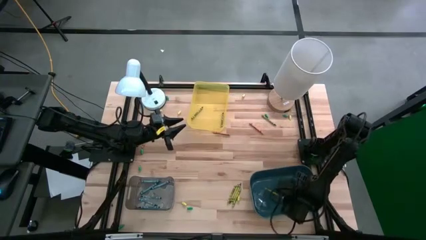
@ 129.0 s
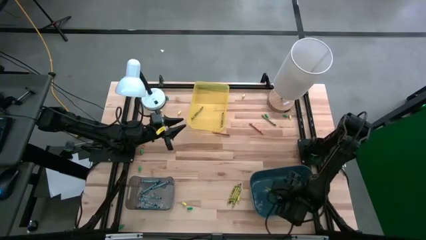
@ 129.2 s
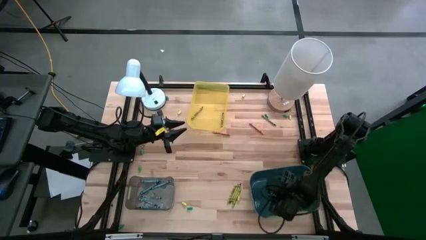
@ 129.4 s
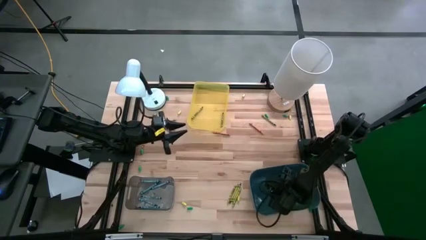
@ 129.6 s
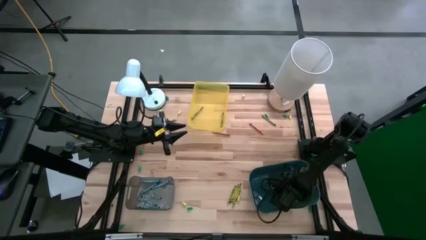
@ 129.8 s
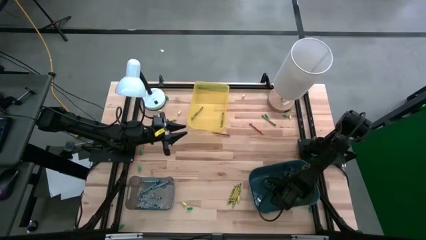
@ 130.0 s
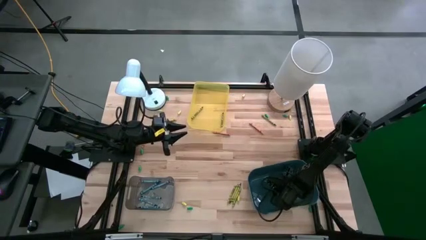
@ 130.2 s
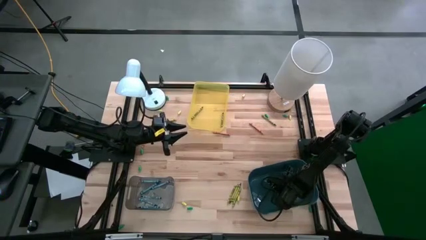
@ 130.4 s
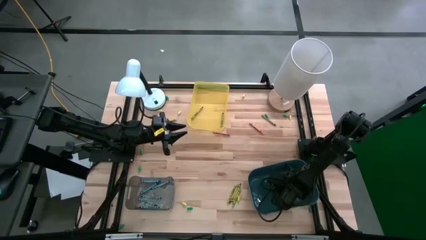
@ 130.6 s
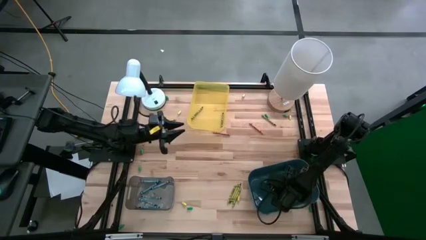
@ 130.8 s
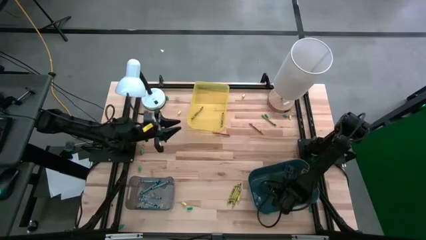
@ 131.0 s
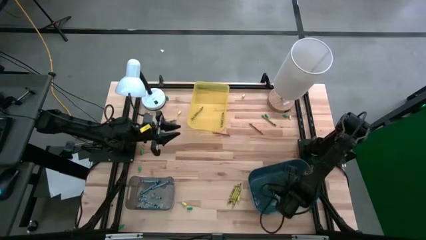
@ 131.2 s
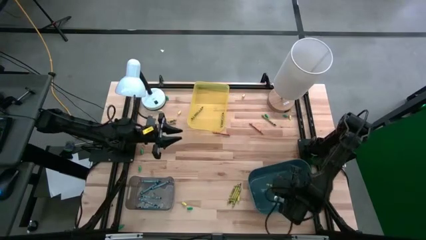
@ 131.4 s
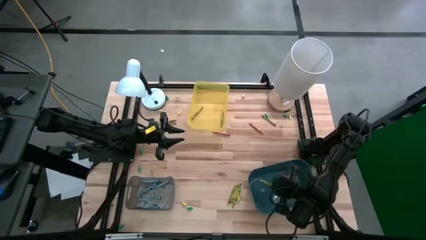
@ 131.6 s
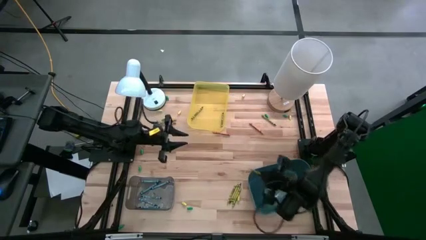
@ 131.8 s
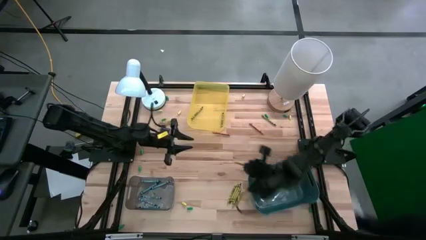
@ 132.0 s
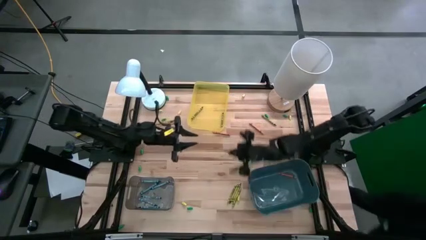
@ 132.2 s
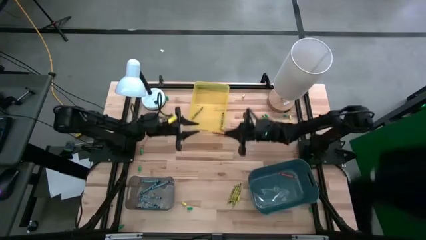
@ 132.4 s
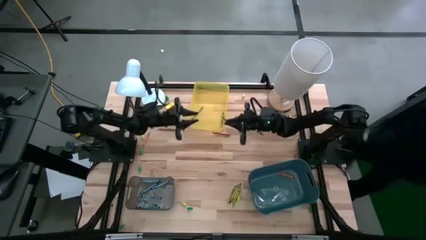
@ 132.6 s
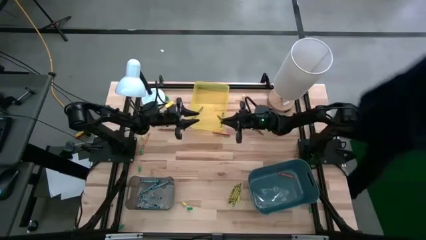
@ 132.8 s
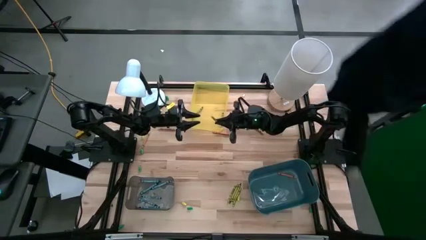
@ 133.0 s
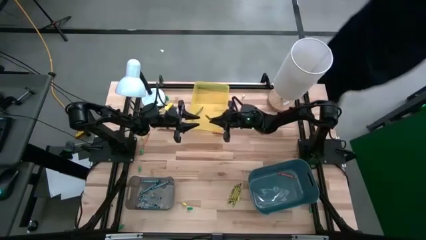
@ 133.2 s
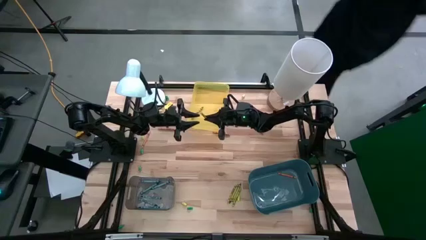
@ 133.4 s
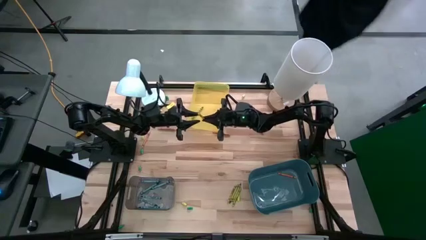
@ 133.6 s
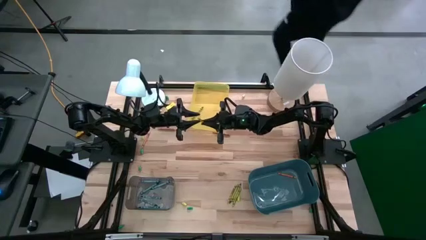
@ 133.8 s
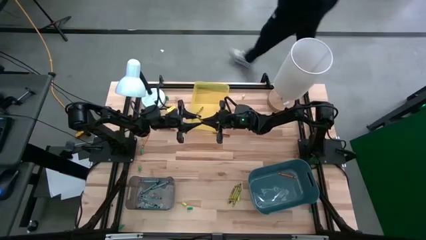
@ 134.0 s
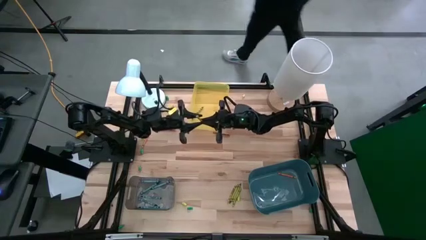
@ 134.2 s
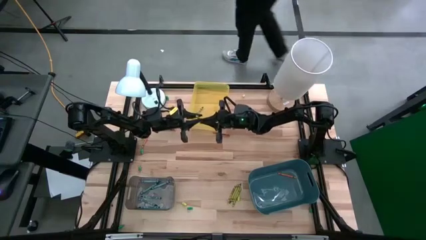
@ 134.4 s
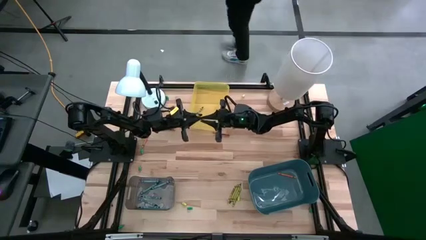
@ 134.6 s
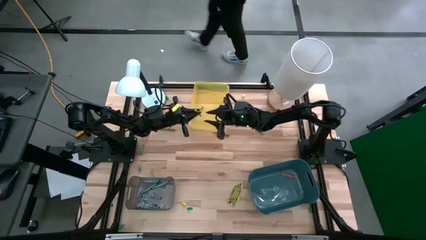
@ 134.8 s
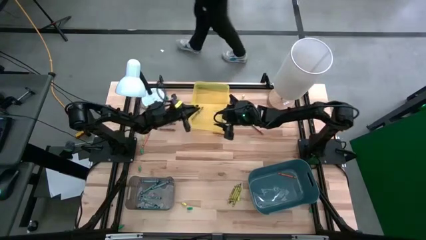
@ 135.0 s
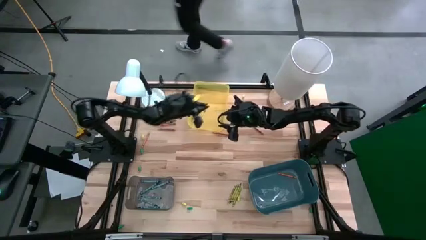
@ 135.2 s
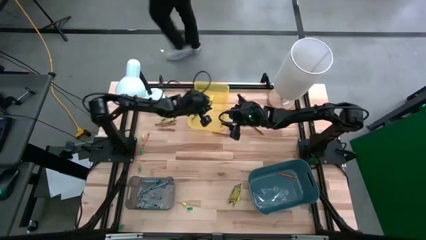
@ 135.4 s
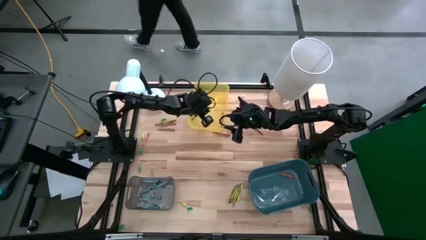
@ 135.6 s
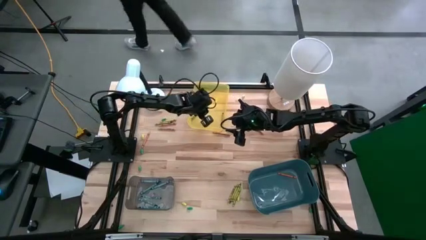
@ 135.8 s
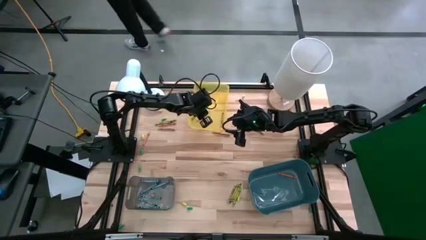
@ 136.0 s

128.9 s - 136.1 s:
Task: Sort crayons
Remove the yellow green crayon from the green bin to the yellow bin

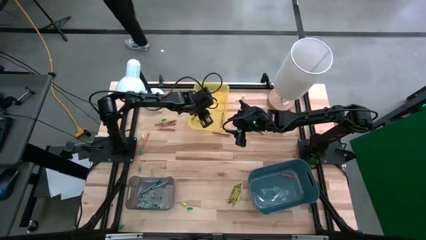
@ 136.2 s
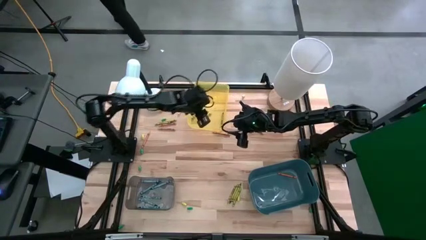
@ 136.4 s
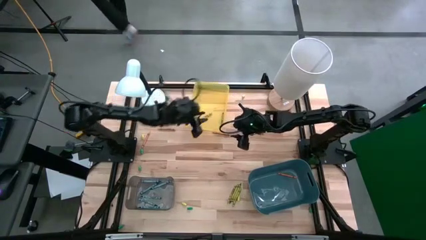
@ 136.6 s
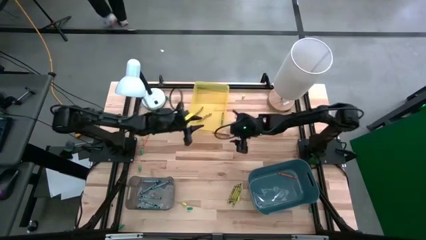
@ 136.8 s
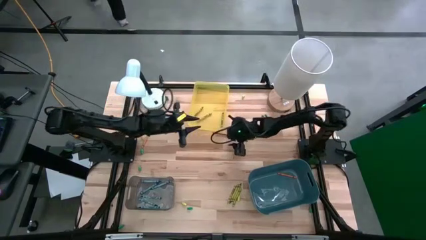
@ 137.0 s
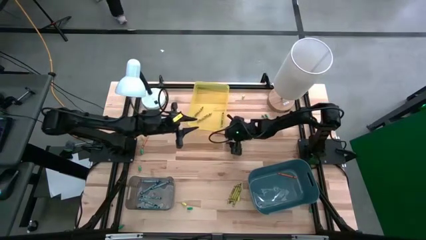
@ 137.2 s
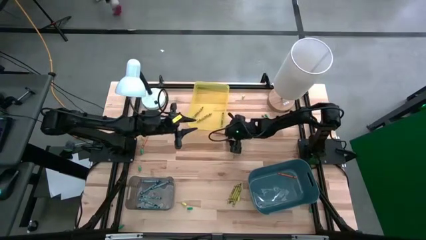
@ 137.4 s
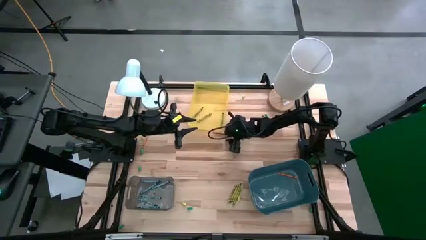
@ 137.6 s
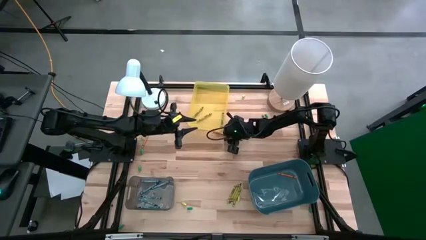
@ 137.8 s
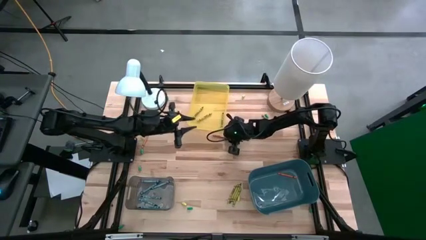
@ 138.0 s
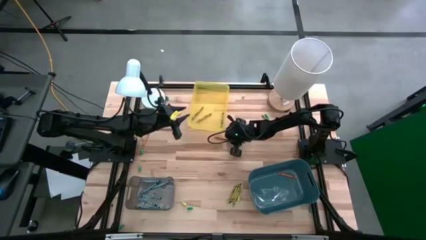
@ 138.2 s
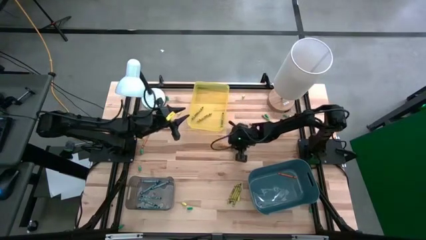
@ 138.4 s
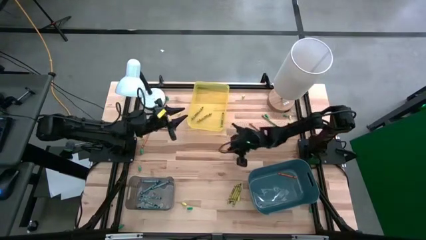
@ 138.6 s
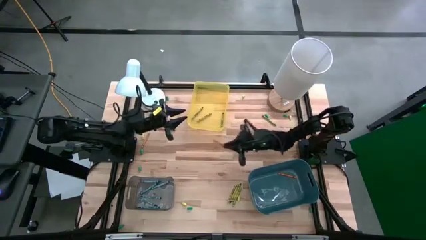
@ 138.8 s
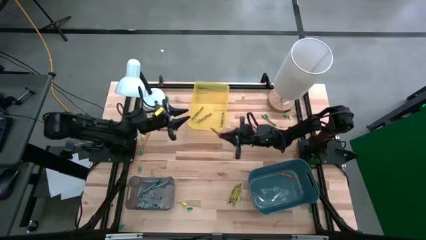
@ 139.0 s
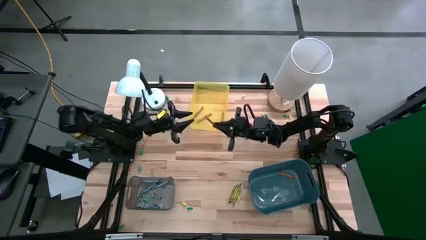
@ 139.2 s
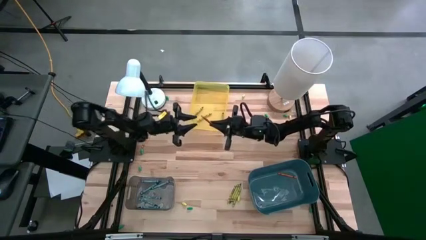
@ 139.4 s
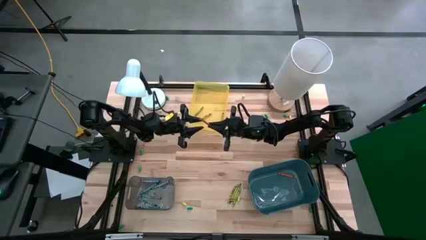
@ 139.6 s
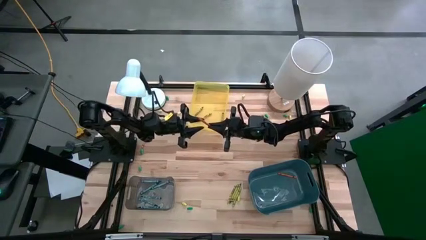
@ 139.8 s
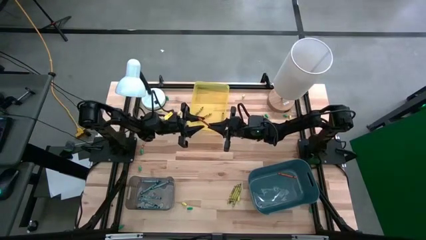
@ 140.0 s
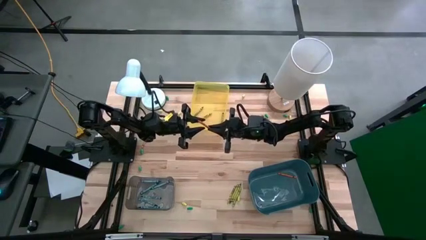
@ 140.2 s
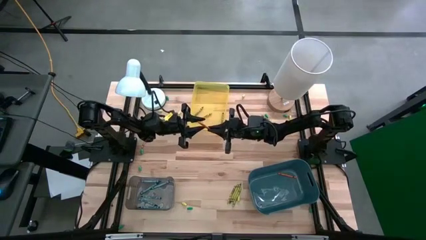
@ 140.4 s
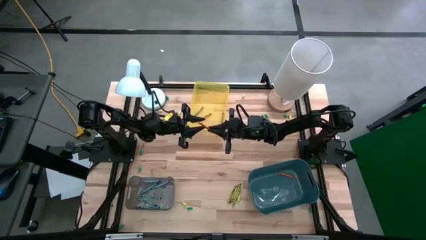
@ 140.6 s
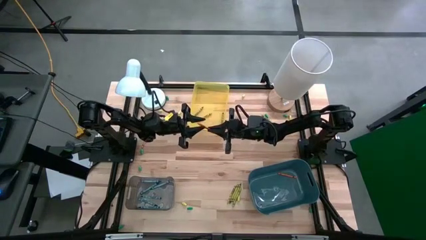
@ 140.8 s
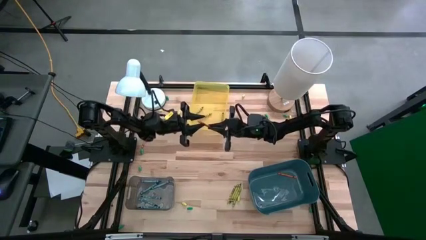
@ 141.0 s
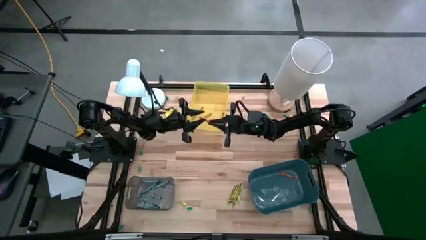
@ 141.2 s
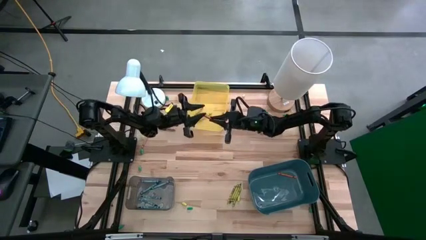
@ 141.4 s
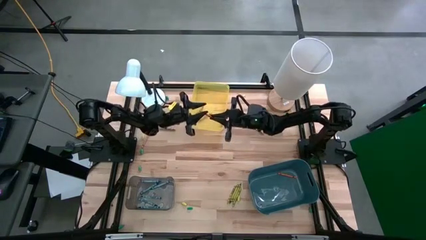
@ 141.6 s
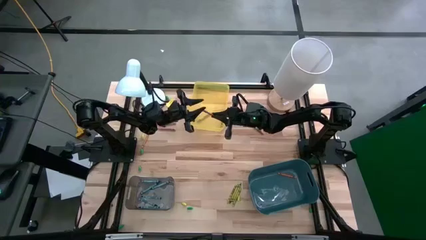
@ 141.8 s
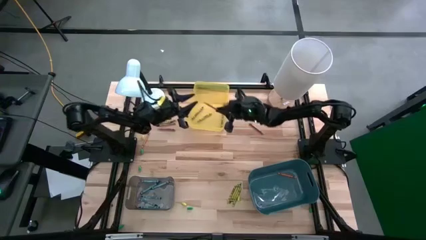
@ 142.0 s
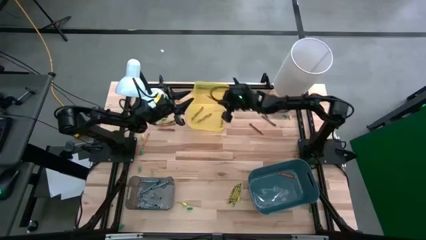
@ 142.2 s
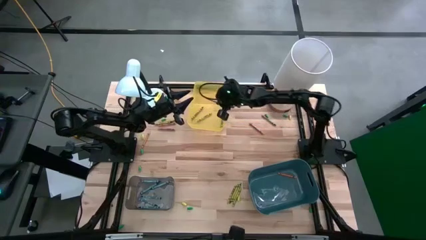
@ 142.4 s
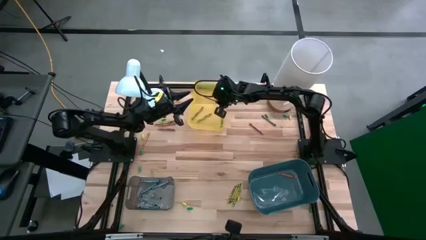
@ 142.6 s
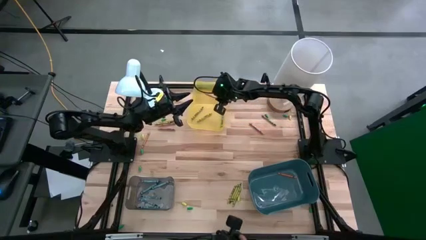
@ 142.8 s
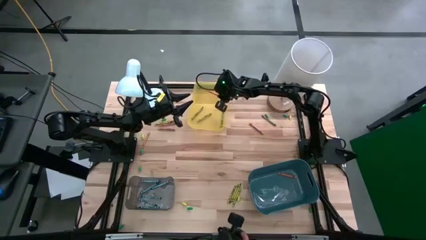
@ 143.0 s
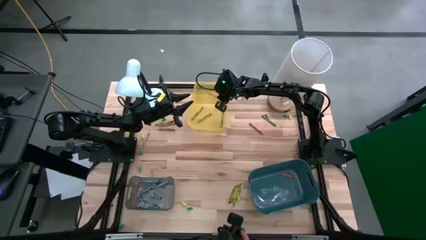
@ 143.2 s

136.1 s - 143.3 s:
Put the orange crayon into the yellow bin
